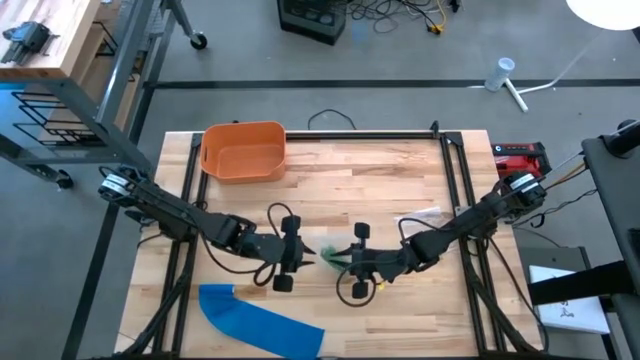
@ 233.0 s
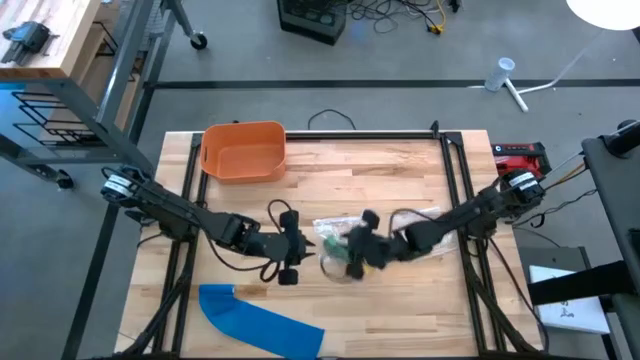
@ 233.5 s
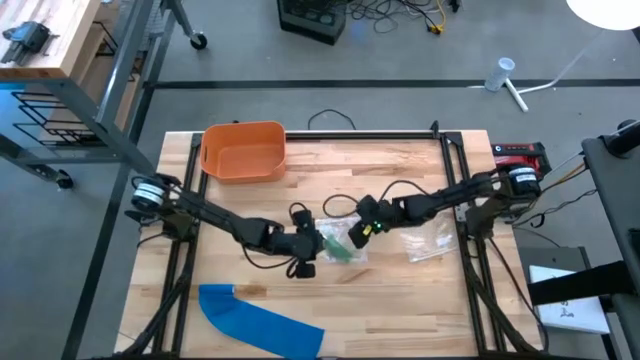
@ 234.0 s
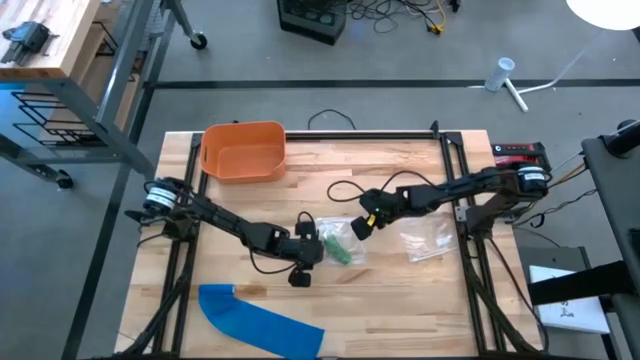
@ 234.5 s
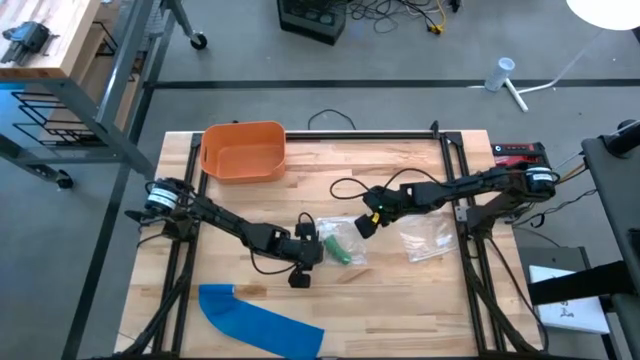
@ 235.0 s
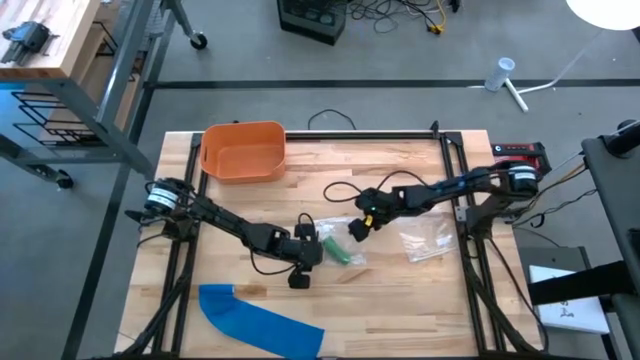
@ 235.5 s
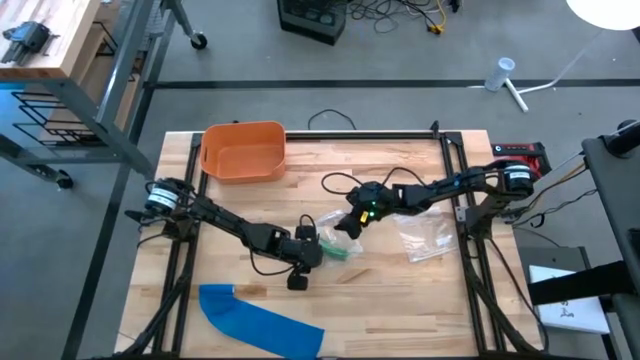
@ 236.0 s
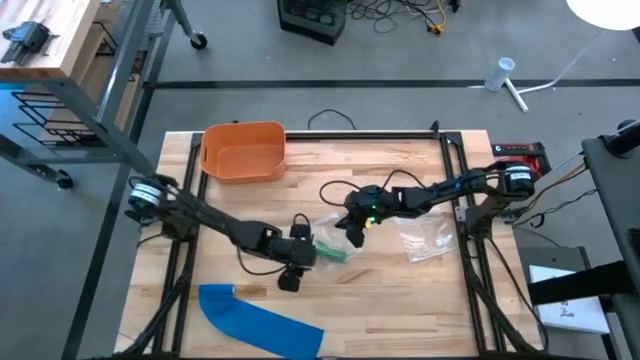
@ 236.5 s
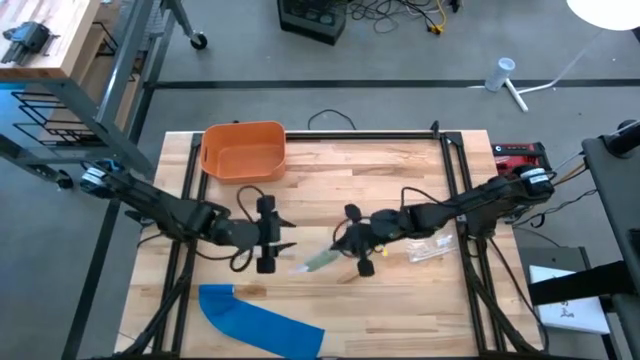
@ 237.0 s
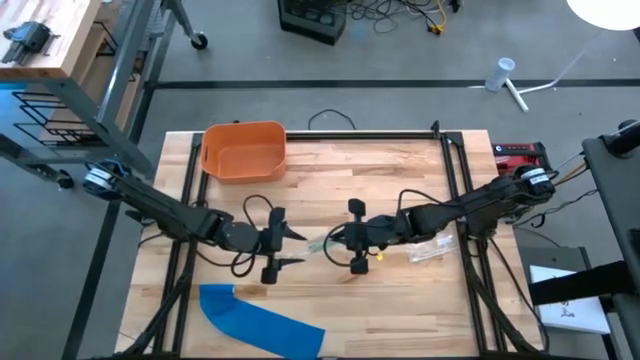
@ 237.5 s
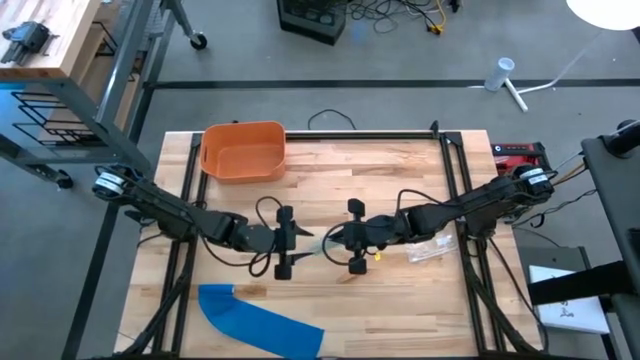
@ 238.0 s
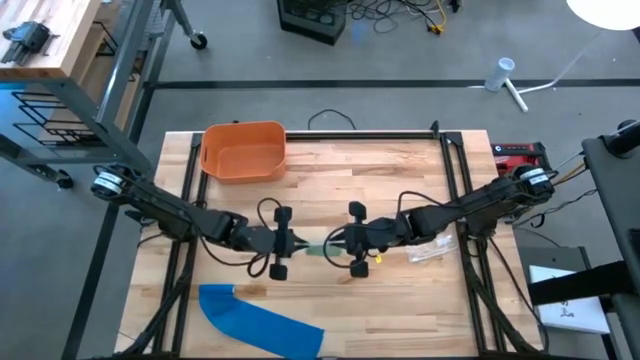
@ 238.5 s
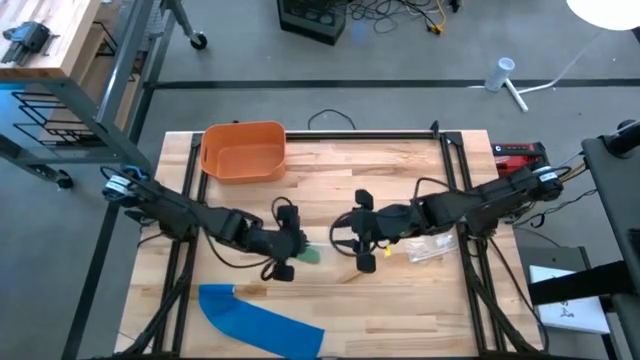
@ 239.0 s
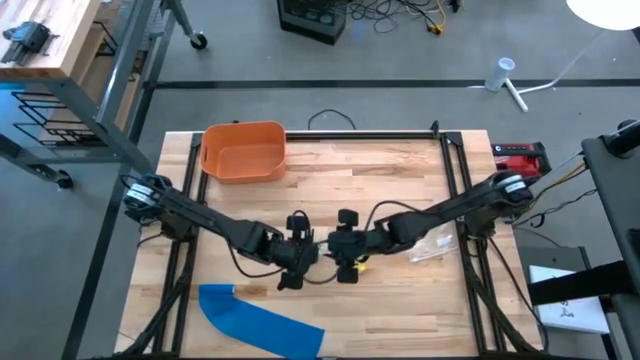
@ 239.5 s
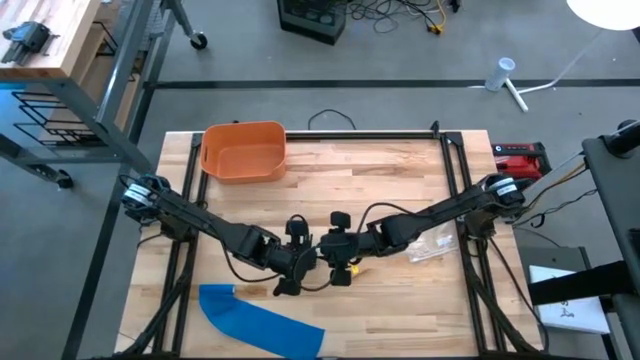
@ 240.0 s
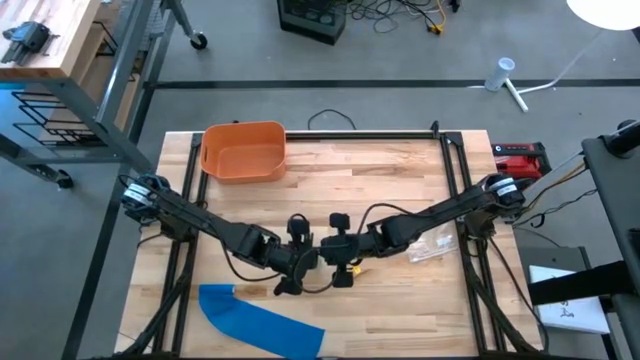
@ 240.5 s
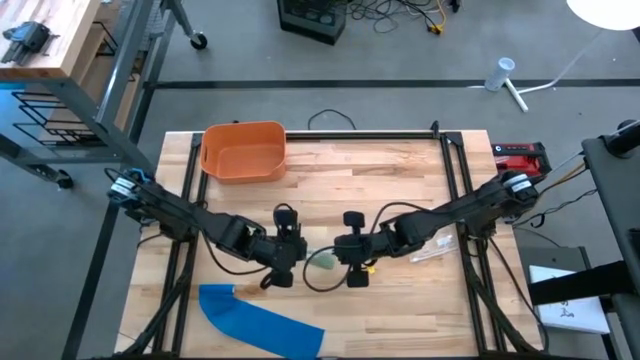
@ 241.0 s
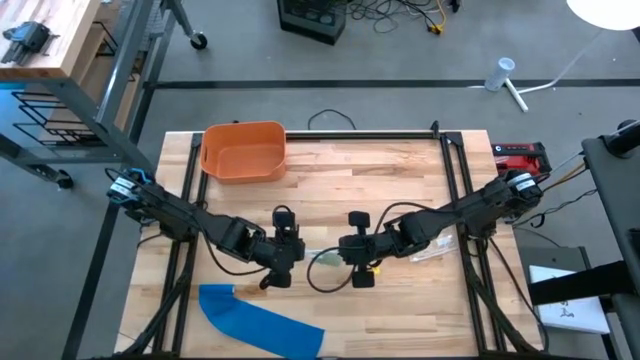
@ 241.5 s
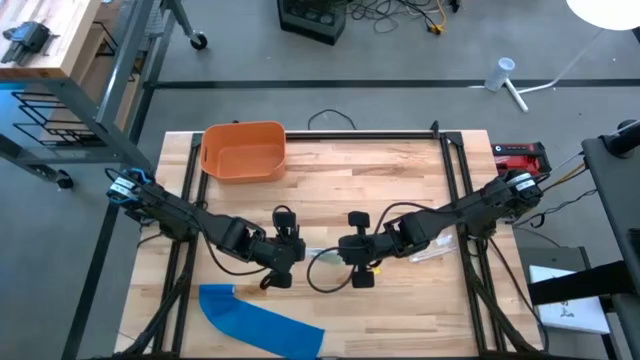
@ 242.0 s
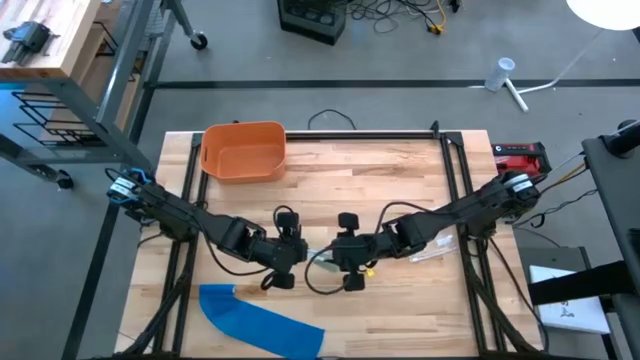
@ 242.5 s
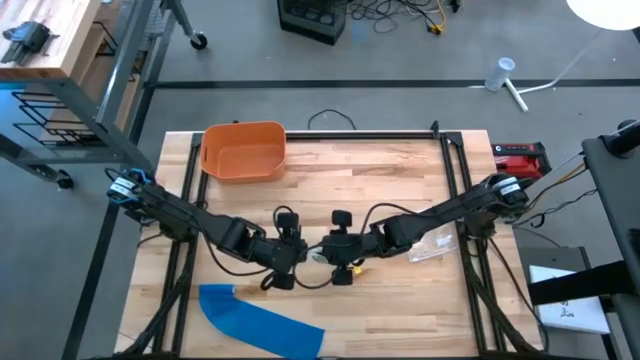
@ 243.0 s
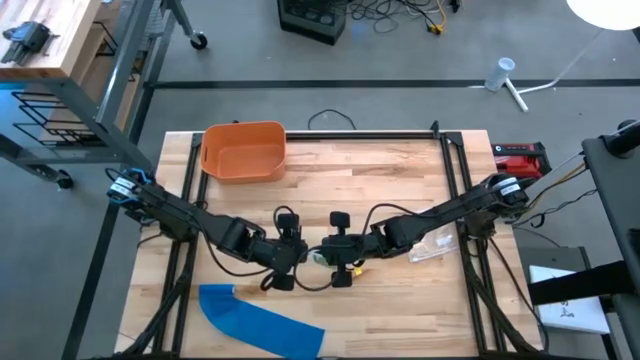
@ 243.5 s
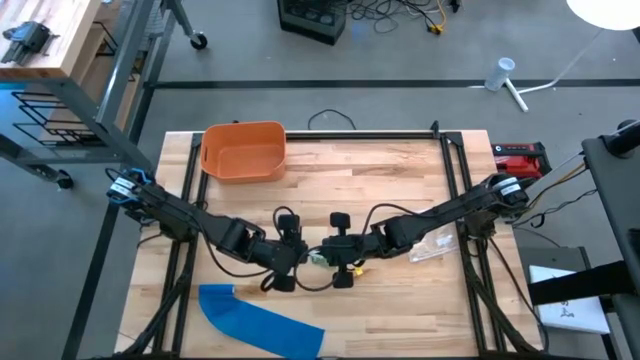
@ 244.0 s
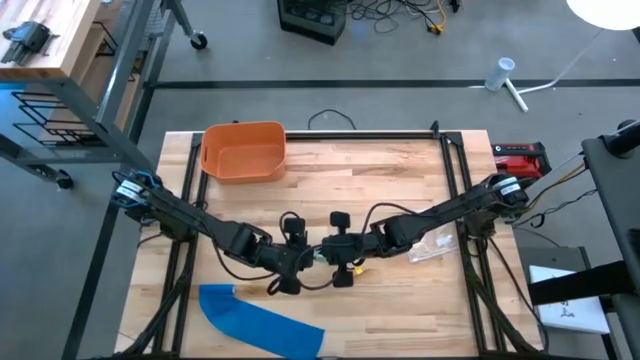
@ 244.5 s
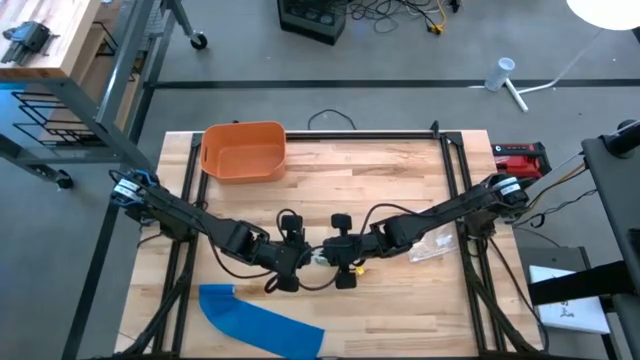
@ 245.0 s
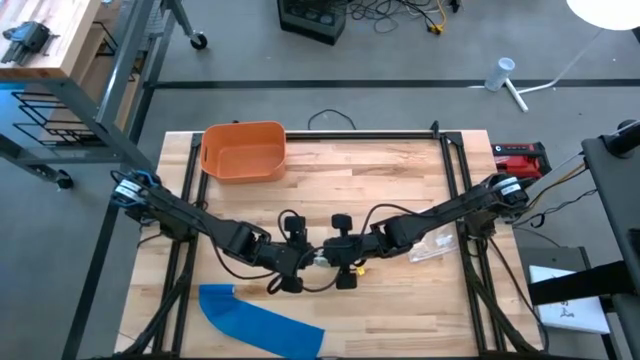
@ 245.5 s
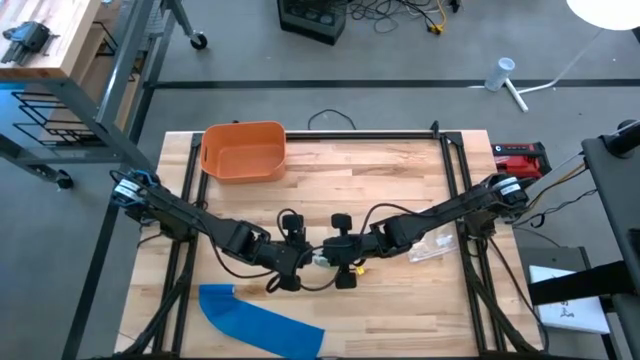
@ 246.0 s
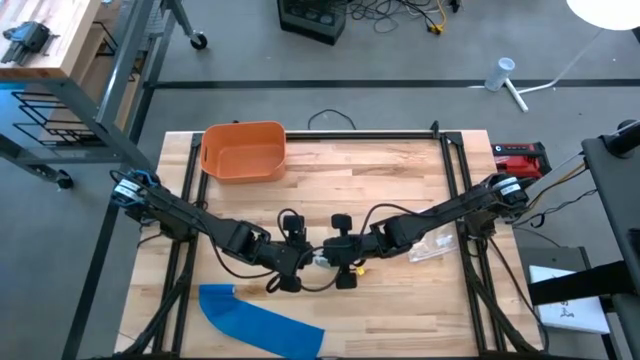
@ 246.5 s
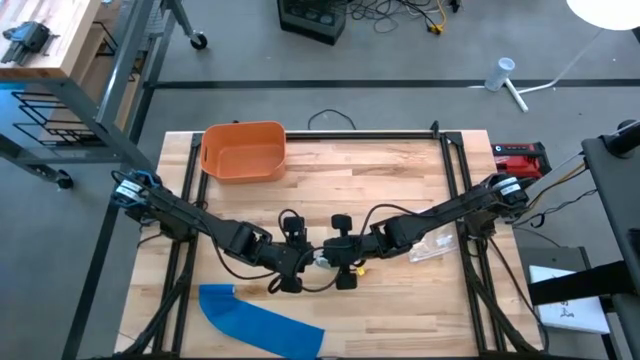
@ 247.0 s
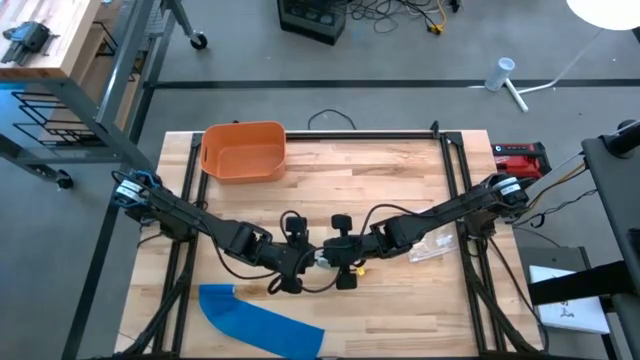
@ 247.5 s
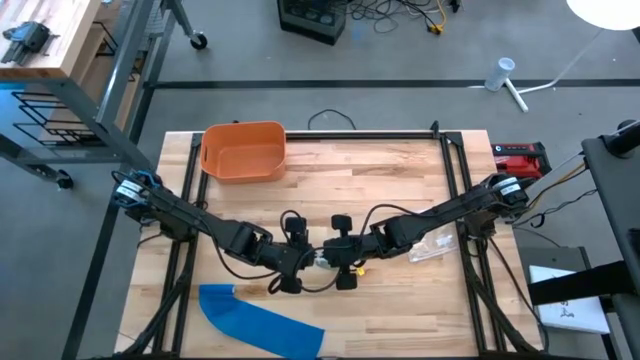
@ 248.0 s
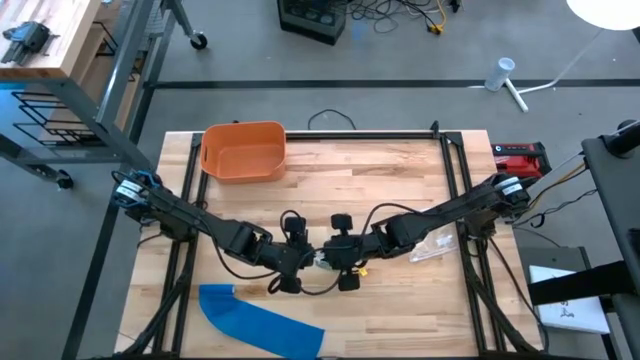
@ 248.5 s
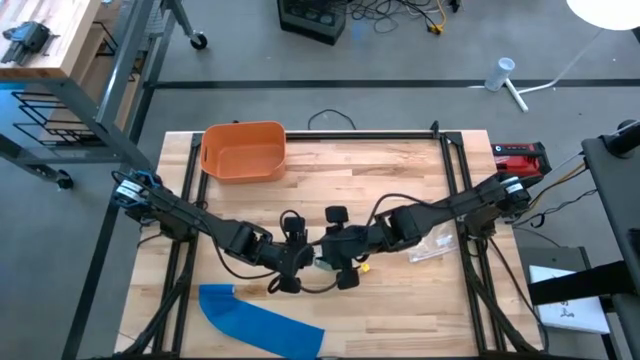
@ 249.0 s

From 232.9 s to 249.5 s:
Task: Roll bandage
Close the transparent zip bag

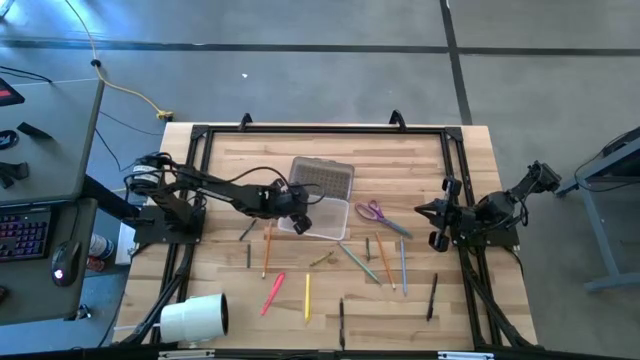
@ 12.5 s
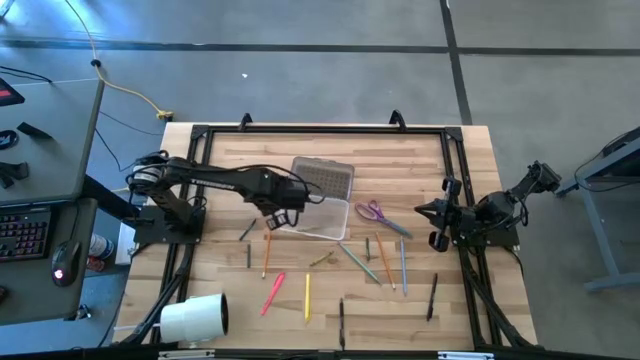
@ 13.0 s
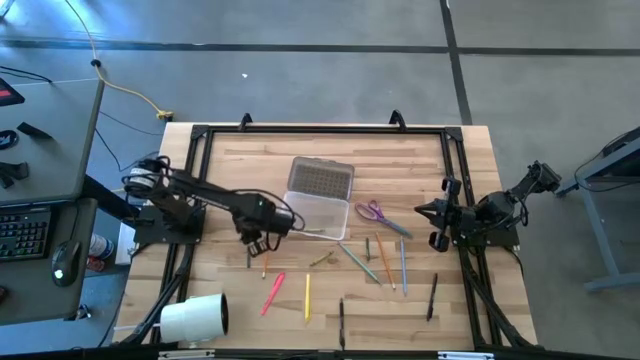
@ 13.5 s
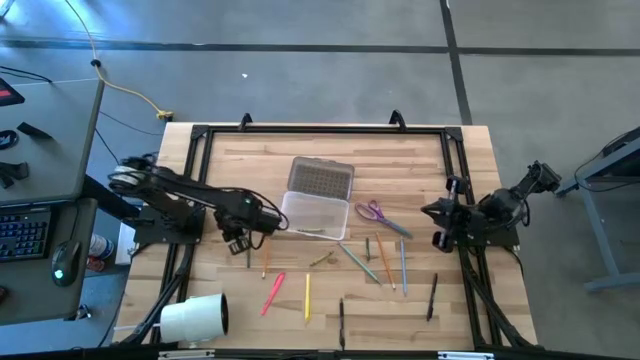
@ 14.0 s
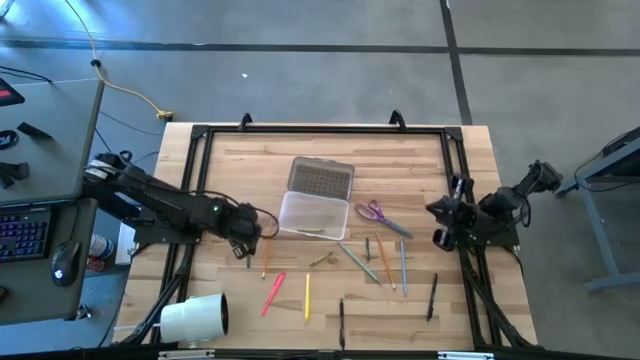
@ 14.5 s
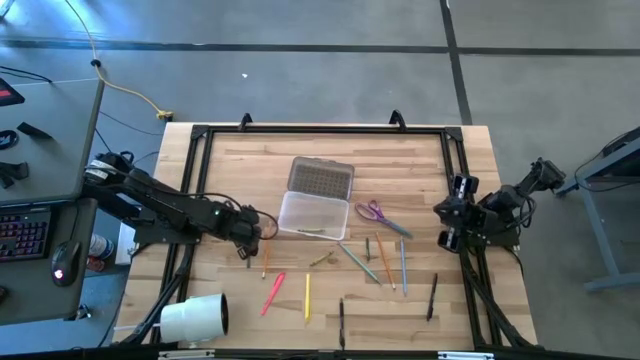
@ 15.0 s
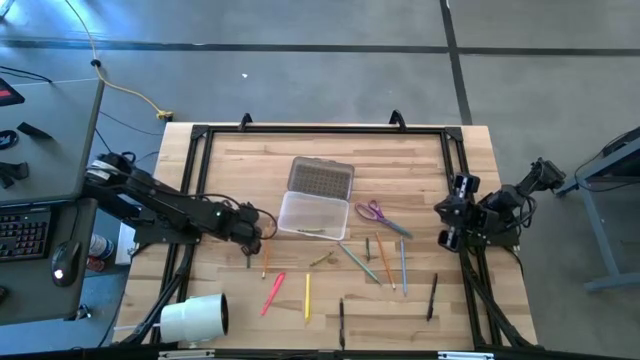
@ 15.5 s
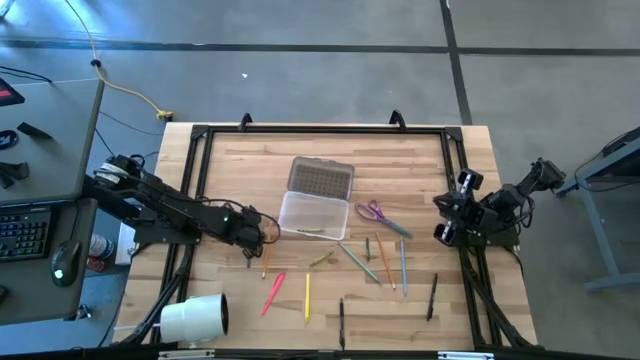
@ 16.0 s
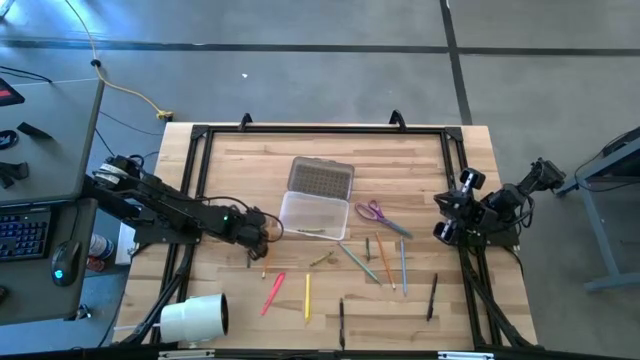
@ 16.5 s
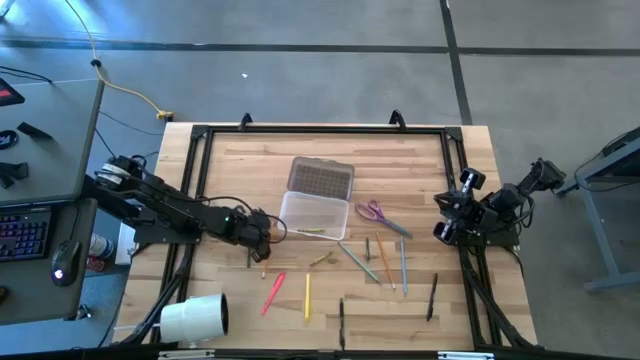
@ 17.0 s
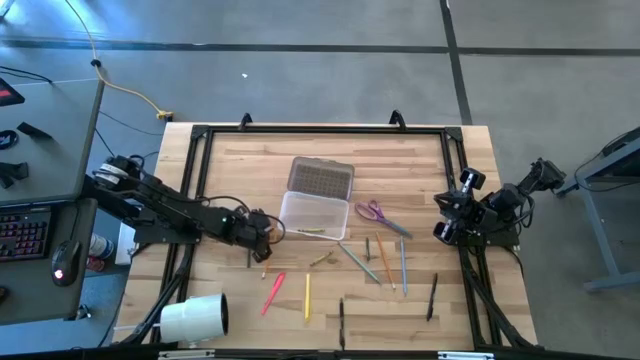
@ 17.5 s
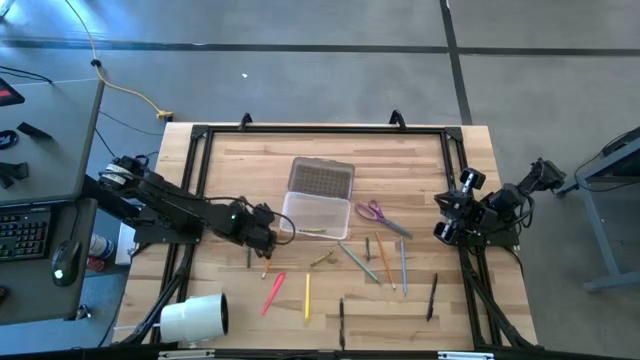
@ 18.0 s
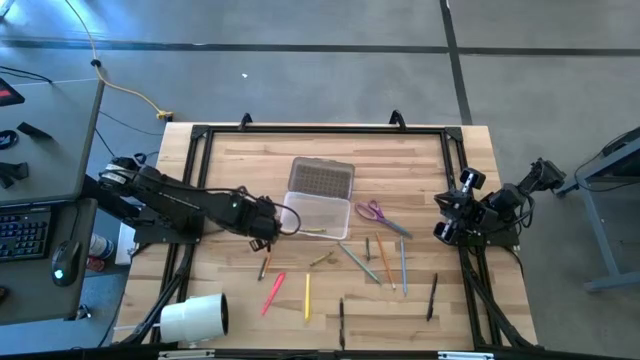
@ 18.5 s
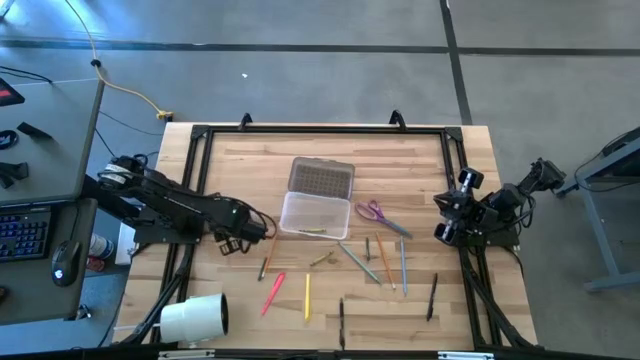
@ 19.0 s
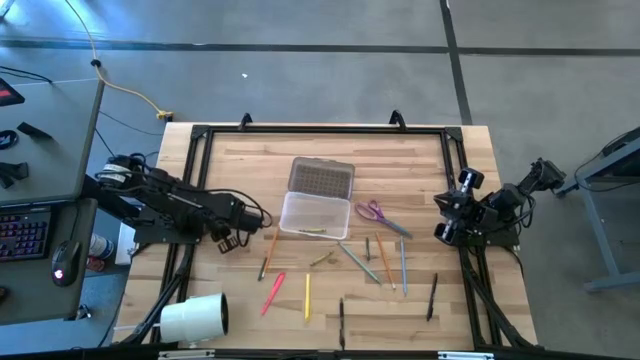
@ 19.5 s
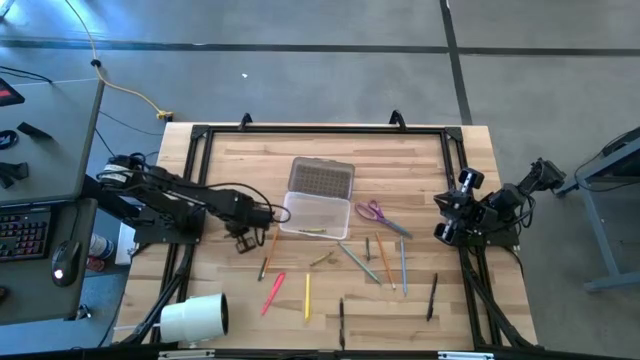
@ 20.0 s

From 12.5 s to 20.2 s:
Task: Pick & place school supplies into a supply box
Put the green crayon into the black supply box
